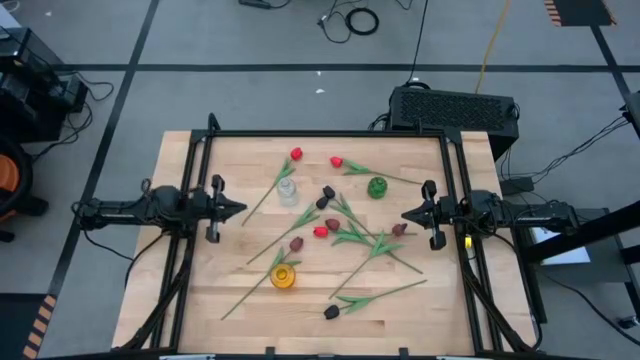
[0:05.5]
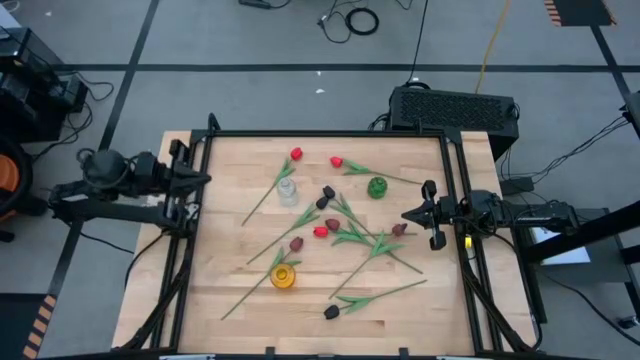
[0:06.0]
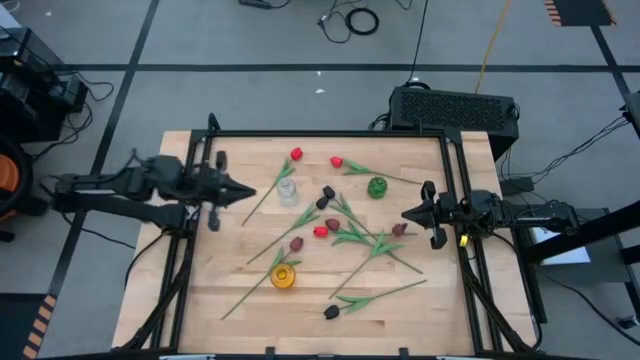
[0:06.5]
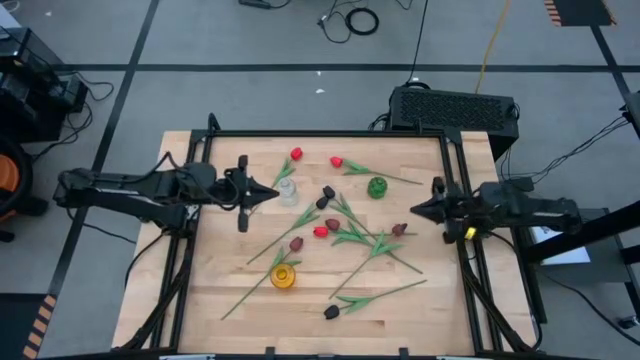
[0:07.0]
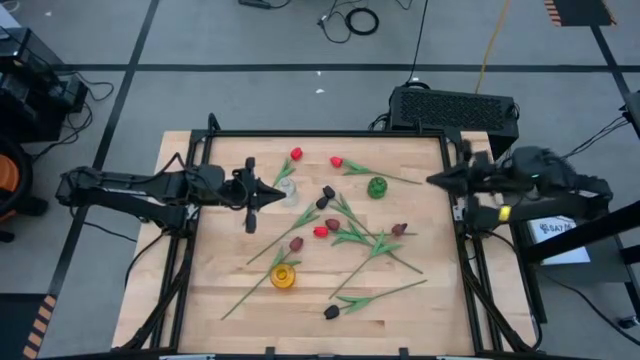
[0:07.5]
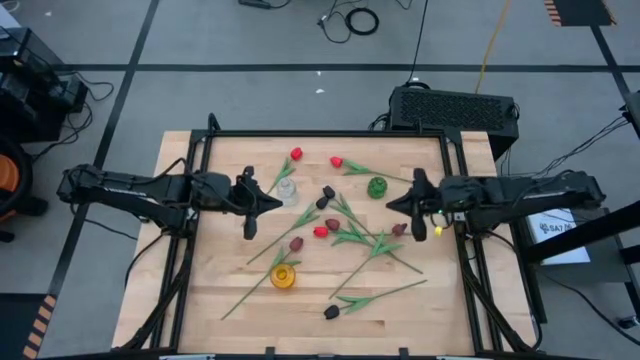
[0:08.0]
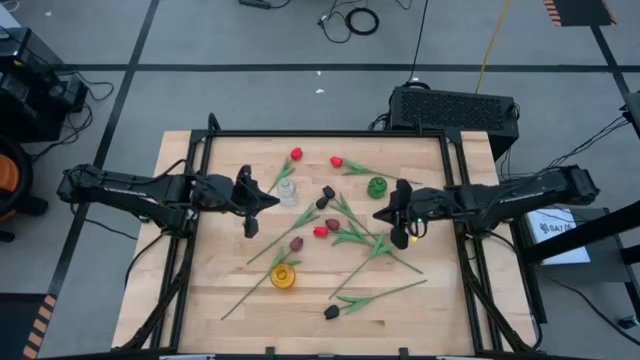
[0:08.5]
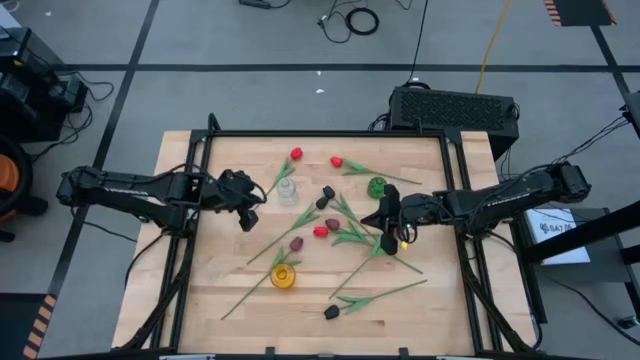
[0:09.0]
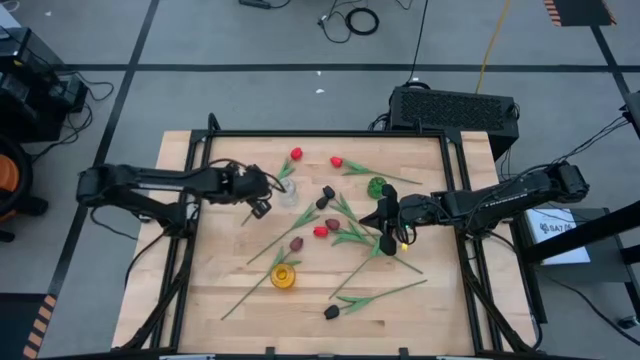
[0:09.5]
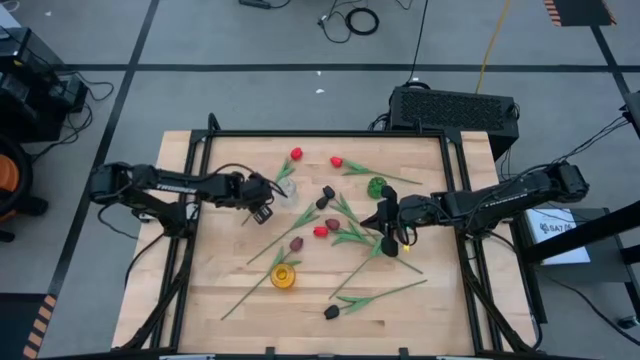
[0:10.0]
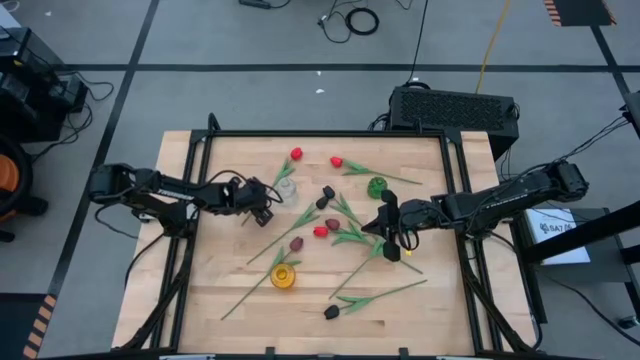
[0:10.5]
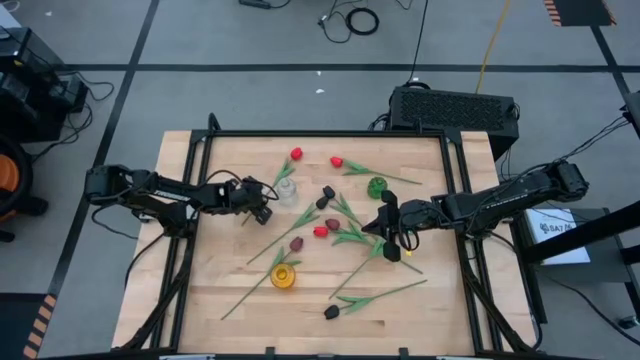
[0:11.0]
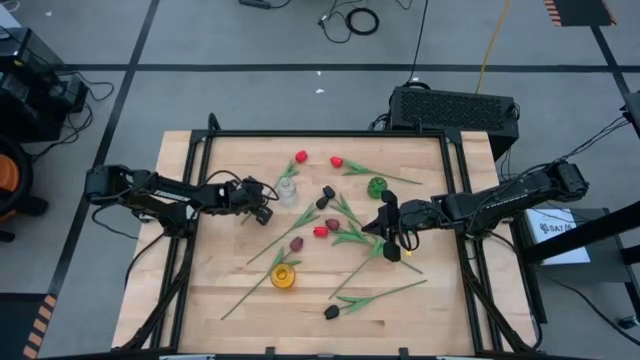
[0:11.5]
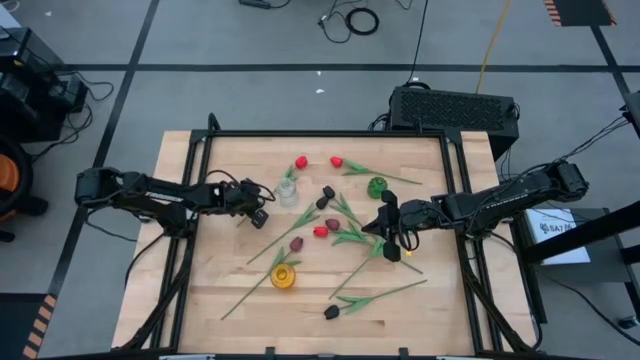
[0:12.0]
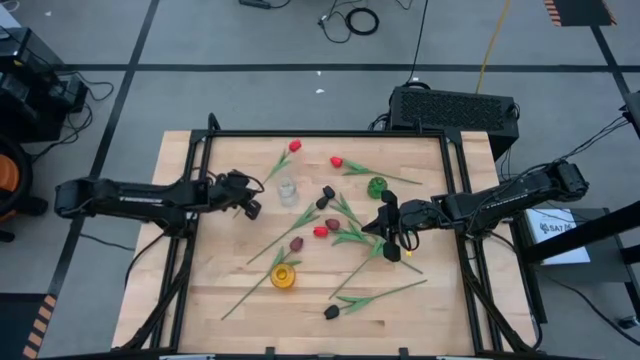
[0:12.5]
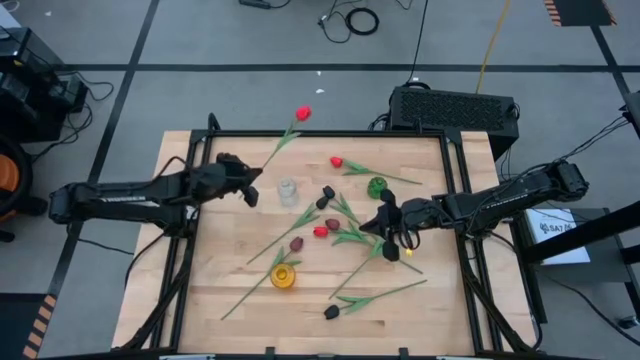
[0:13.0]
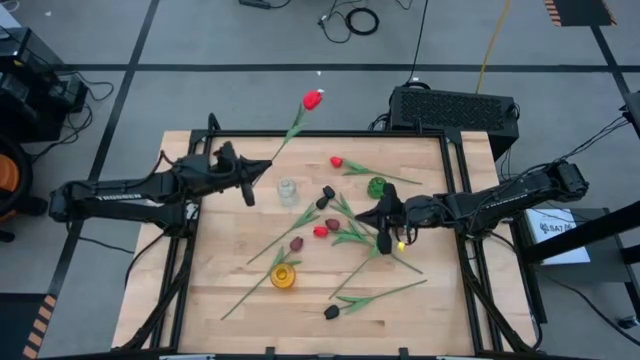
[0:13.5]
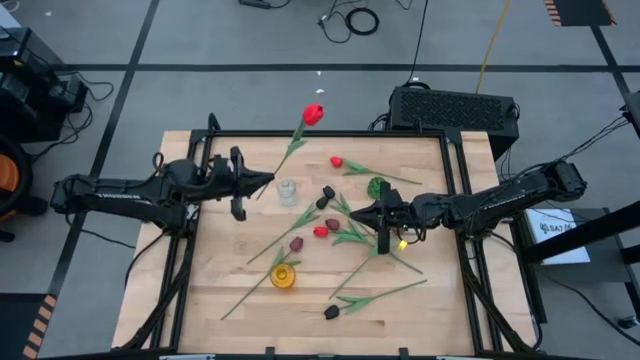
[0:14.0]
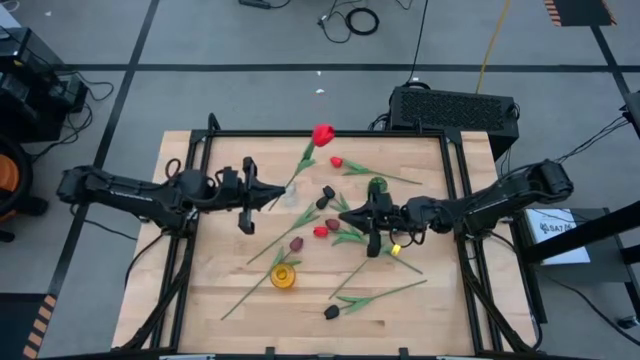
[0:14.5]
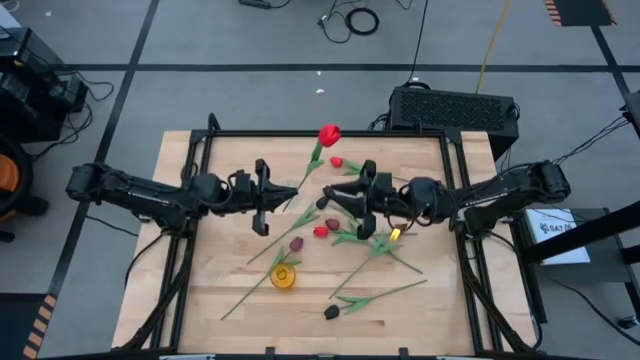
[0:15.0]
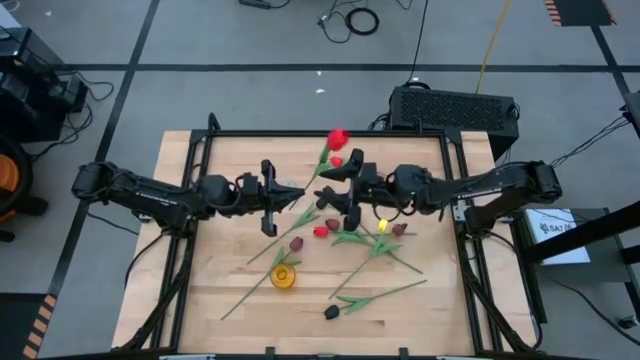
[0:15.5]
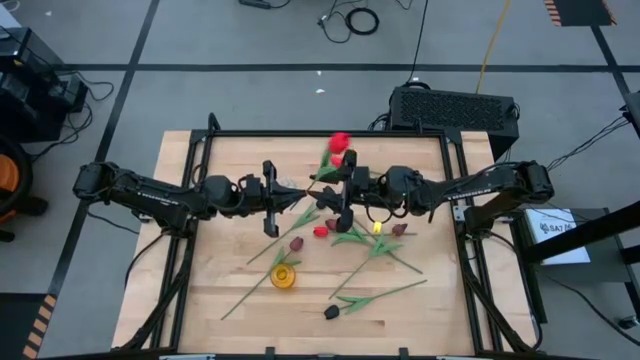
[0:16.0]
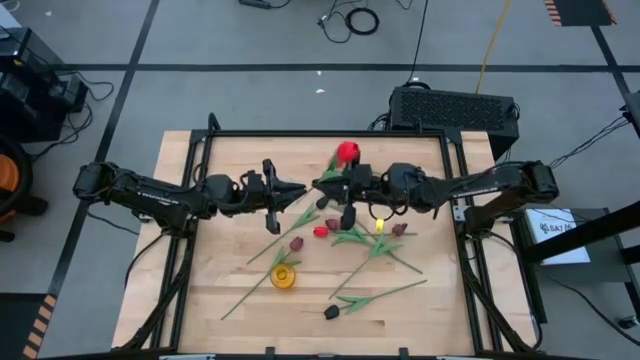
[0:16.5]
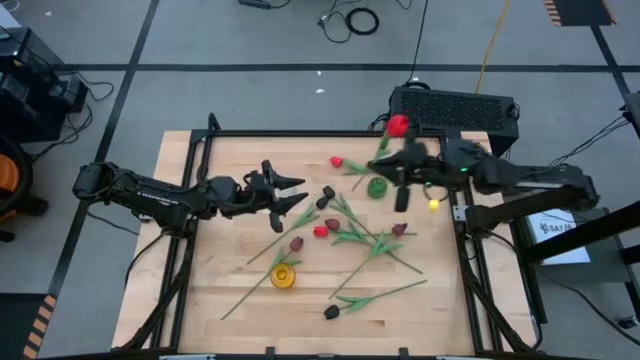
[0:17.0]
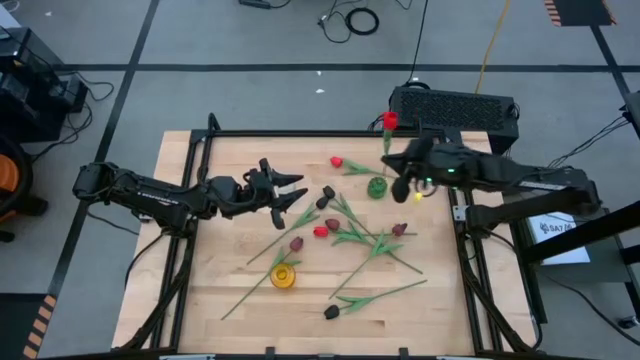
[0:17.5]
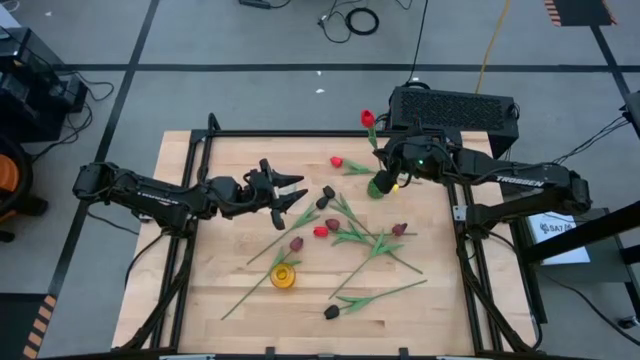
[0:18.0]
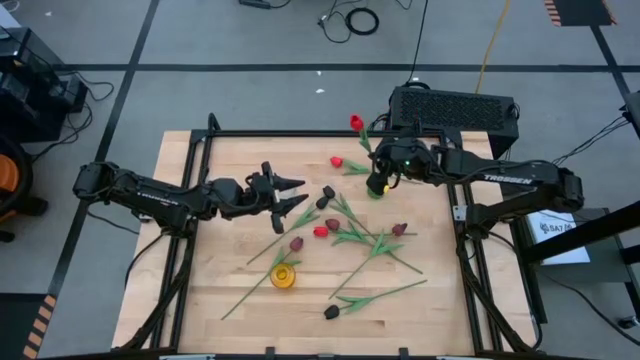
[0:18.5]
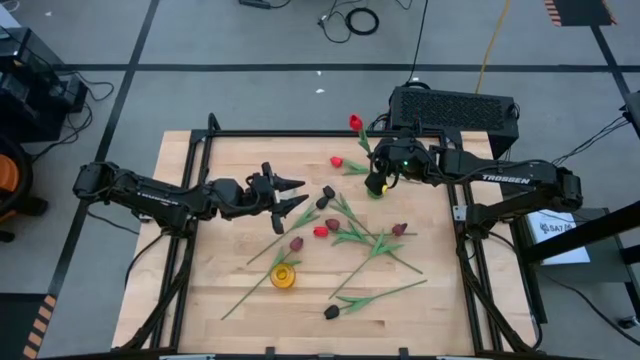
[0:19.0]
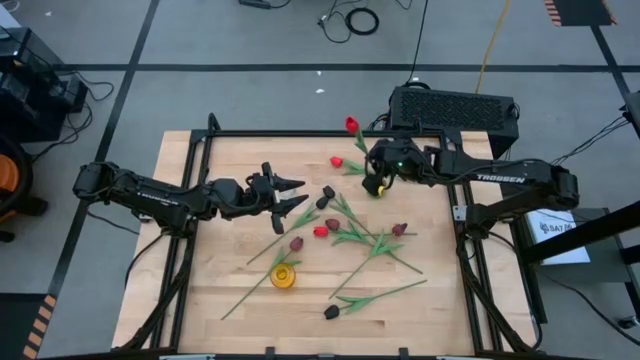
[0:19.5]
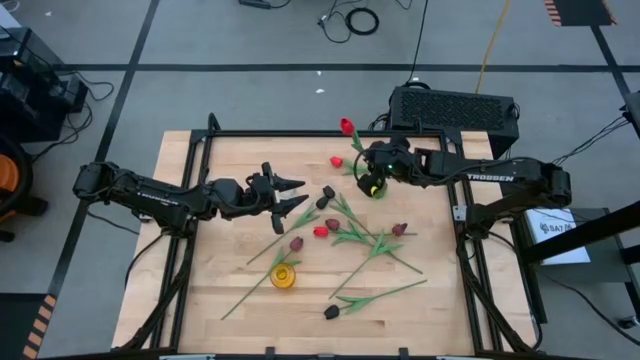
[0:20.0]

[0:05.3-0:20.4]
Task: Sort flowers into vase by color
Put the top left red tulip into the green vase

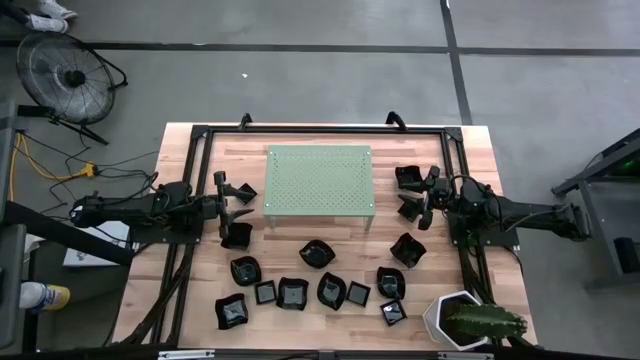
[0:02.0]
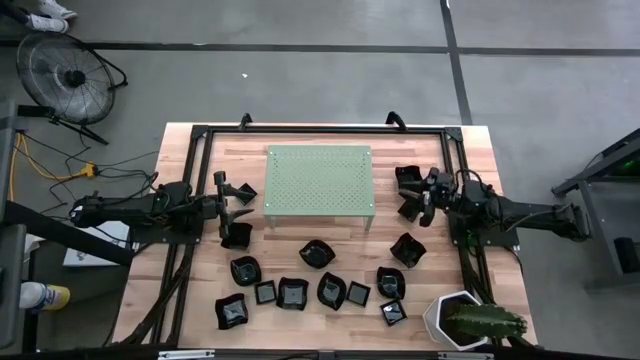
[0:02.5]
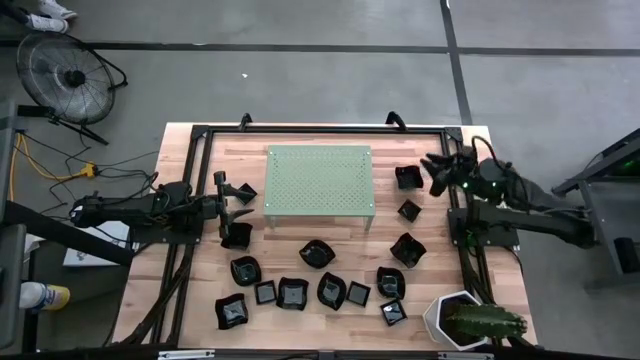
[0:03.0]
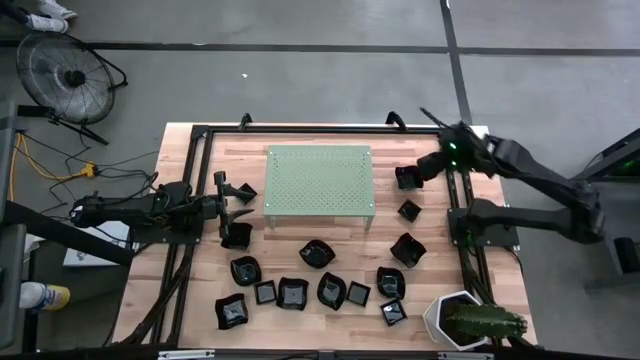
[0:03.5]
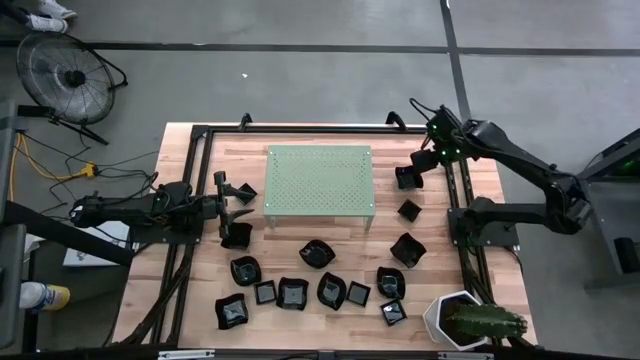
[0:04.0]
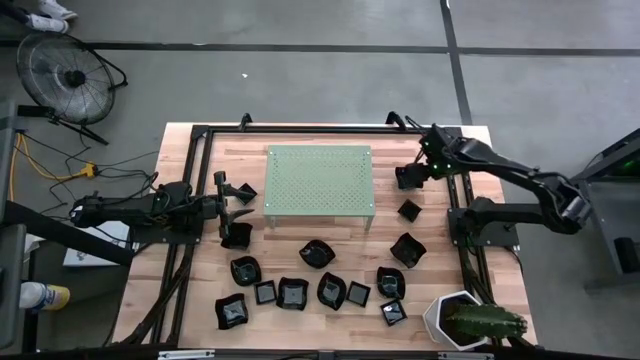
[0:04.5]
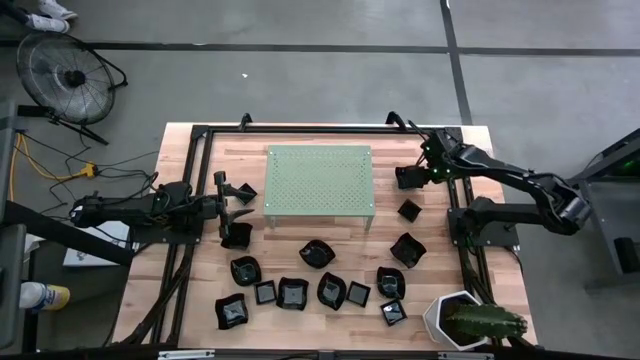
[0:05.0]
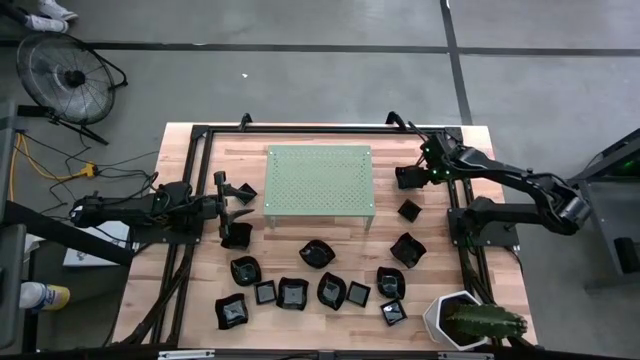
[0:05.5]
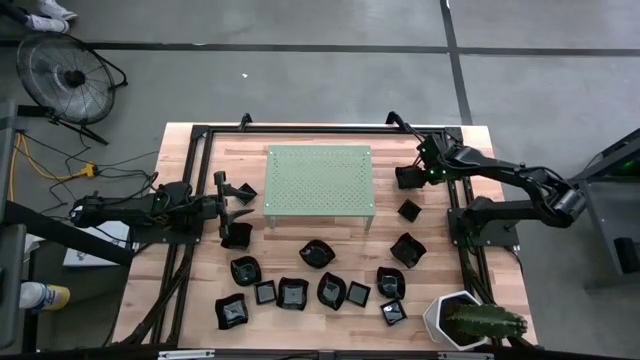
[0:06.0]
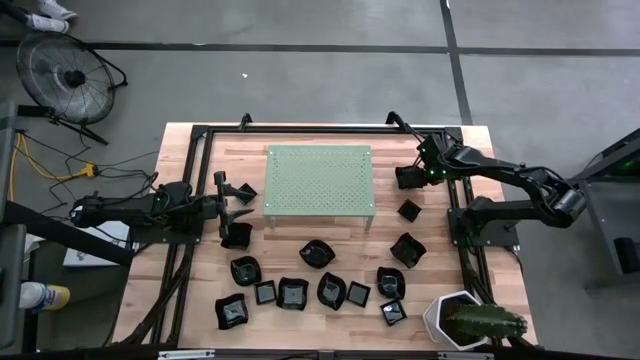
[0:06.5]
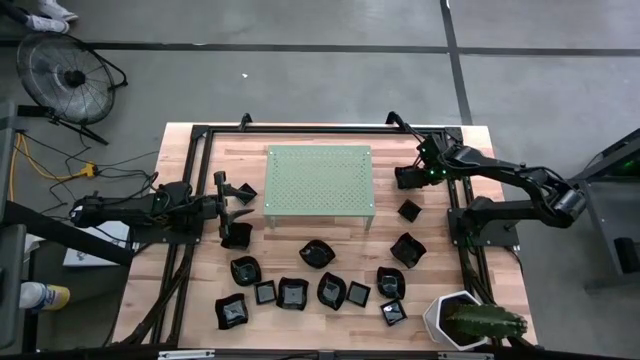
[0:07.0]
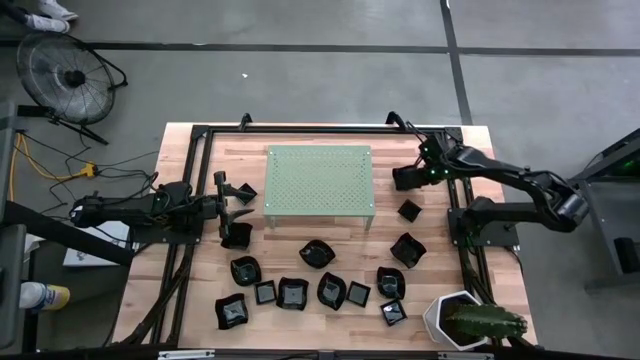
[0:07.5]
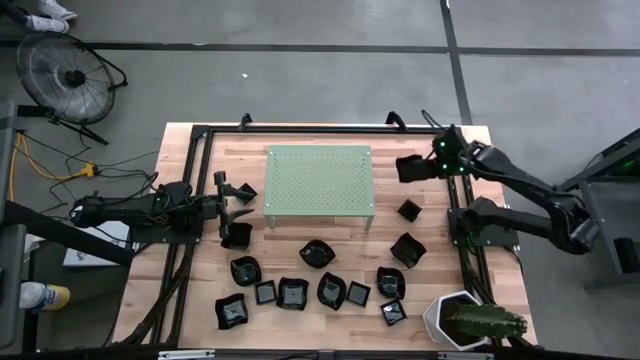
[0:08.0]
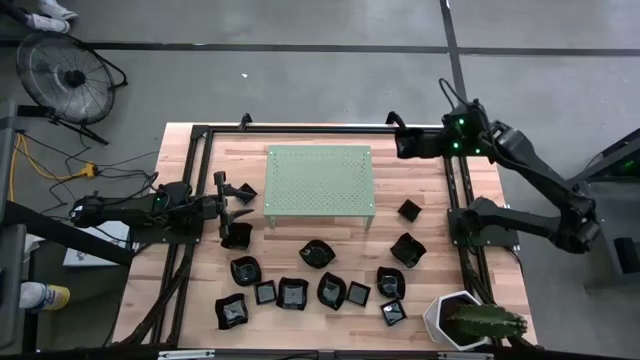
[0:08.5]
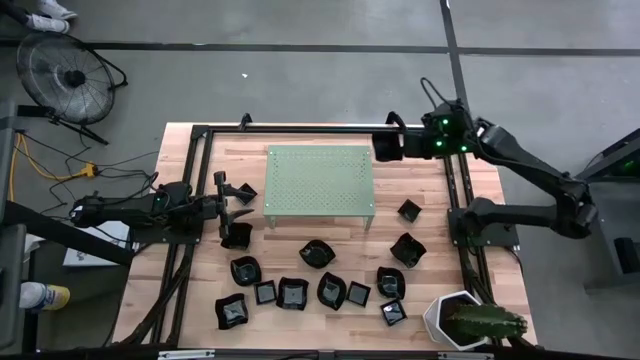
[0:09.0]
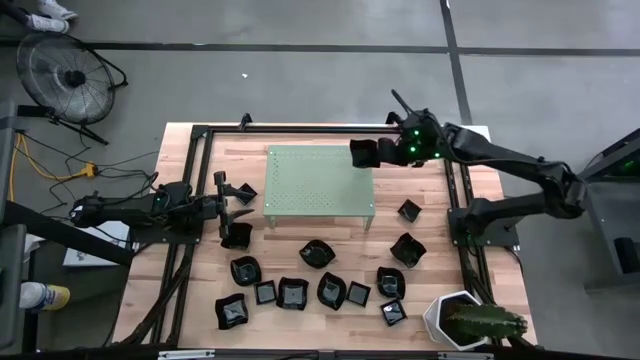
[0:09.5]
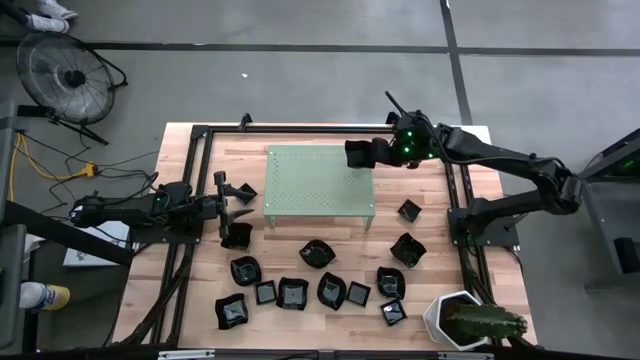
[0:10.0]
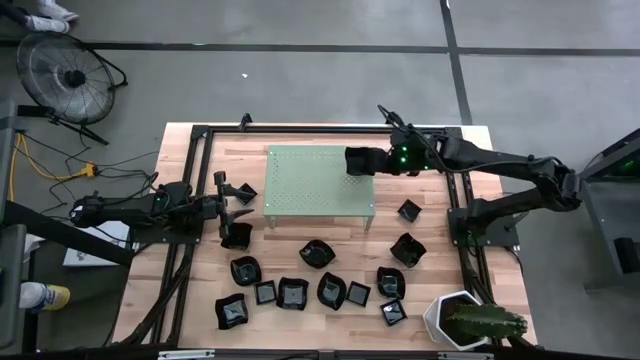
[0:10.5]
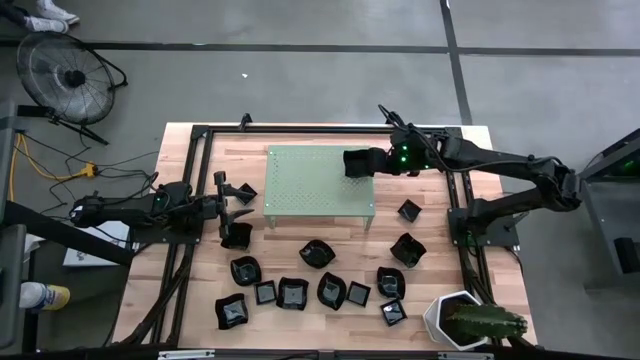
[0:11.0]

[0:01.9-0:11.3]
Task: Pick & Place Mini shaped plates
Put the distorted square plate on the shelf
